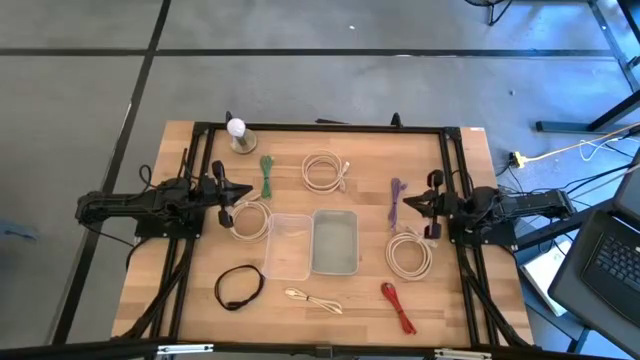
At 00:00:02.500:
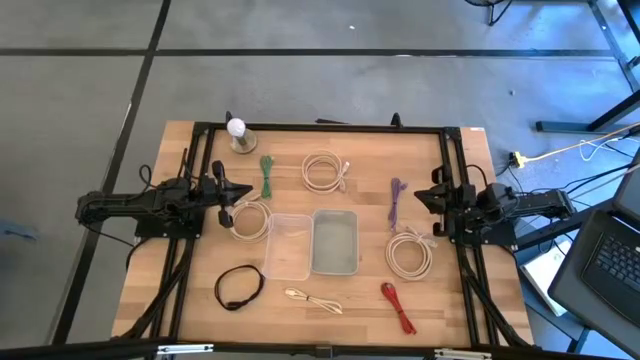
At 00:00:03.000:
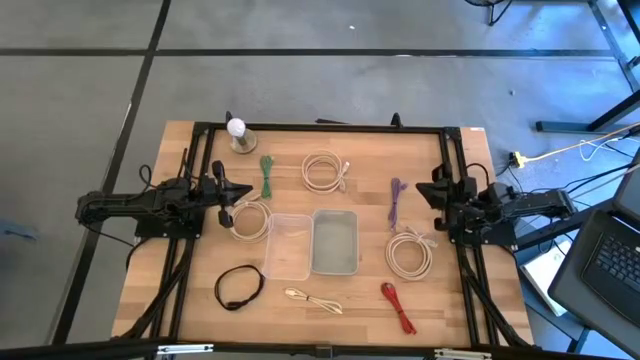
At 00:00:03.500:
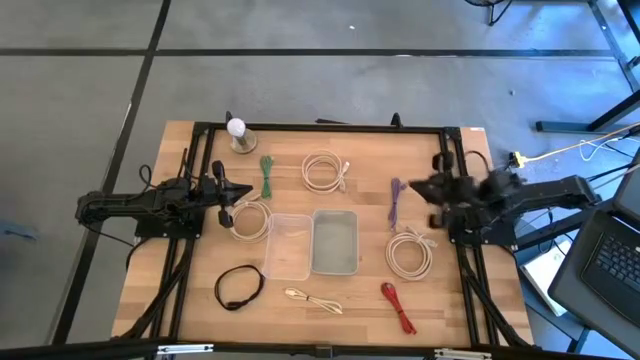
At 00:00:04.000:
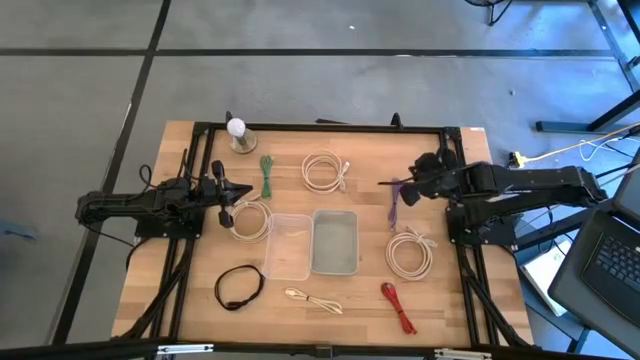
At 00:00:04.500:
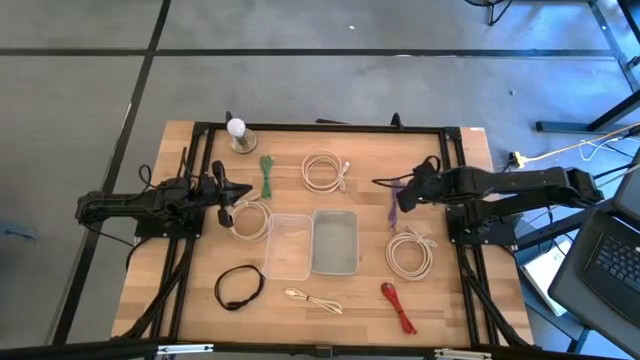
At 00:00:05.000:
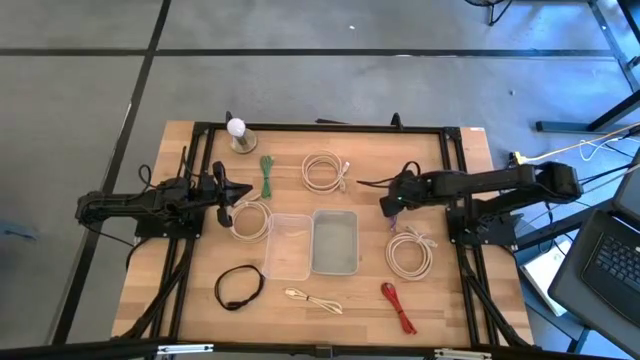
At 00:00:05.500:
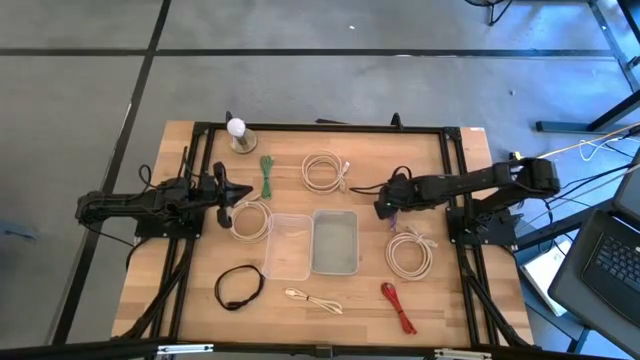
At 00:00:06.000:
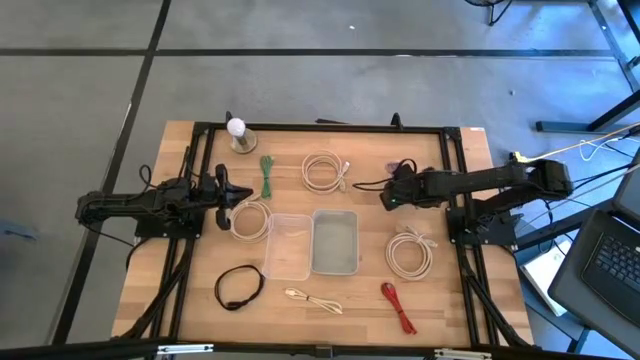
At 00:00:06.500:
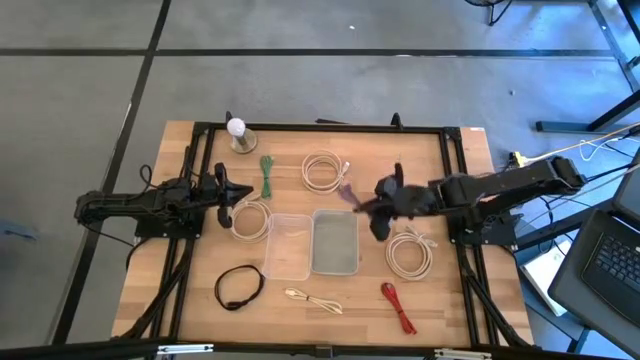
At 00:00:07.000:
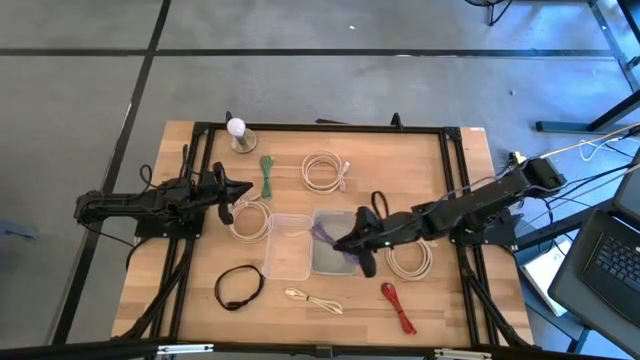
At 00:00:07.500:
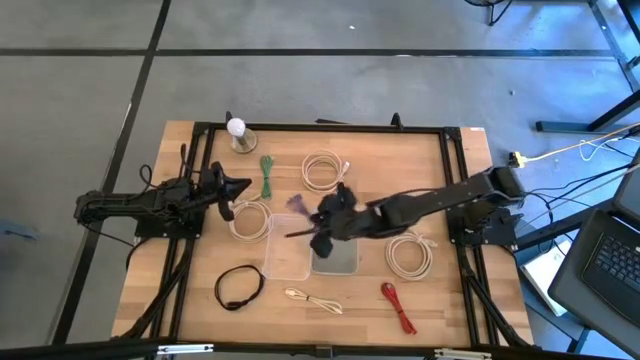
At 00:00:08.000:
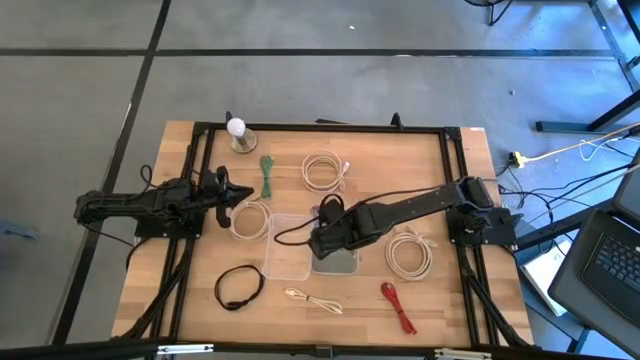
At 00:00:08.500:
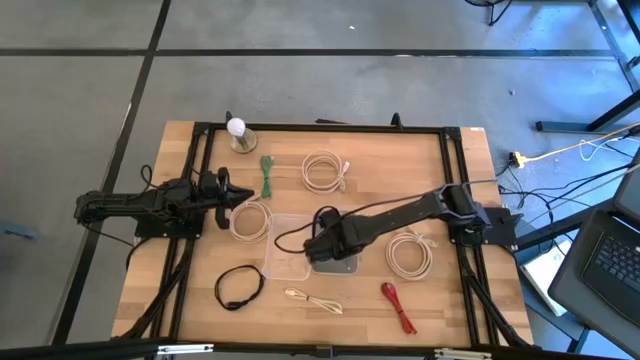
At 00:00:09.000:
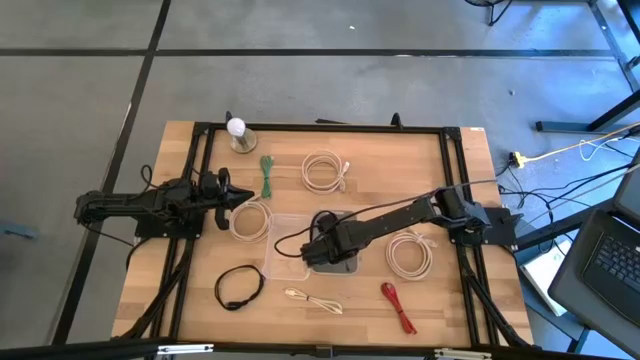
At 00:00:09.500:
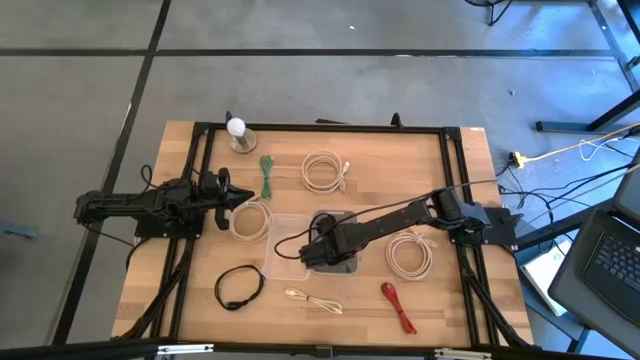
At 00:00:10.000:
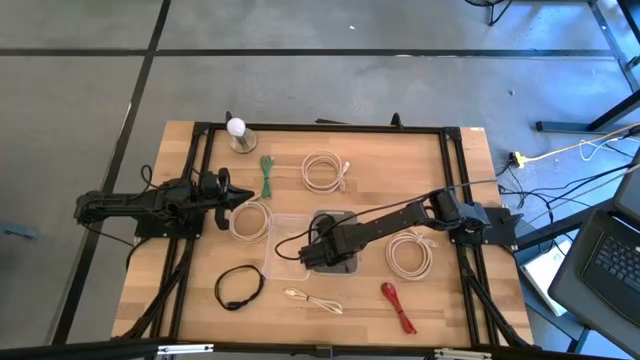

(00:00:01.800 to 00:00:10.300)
Put the violet charger cable into the gray bin

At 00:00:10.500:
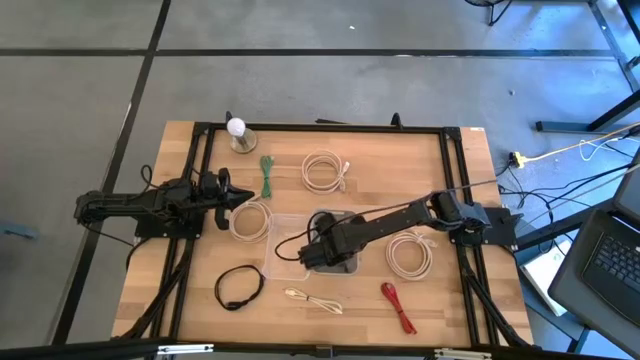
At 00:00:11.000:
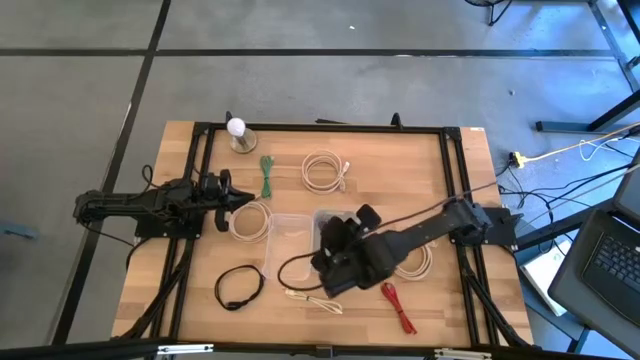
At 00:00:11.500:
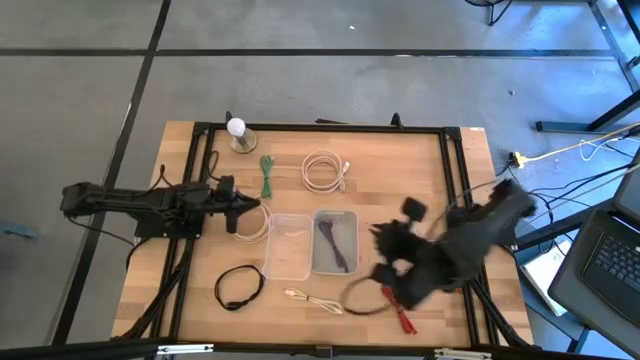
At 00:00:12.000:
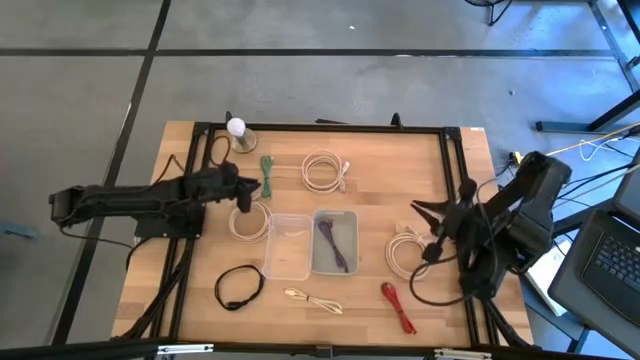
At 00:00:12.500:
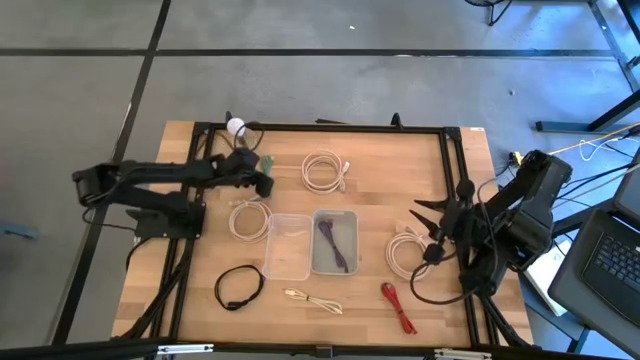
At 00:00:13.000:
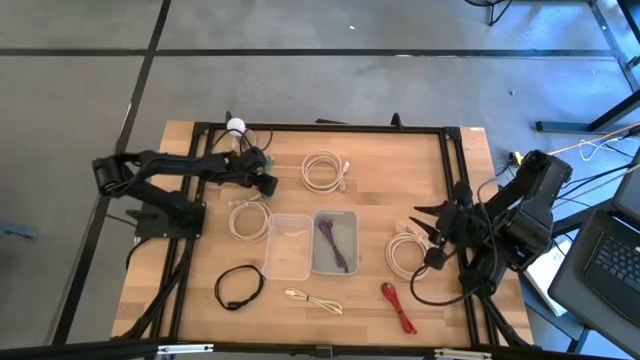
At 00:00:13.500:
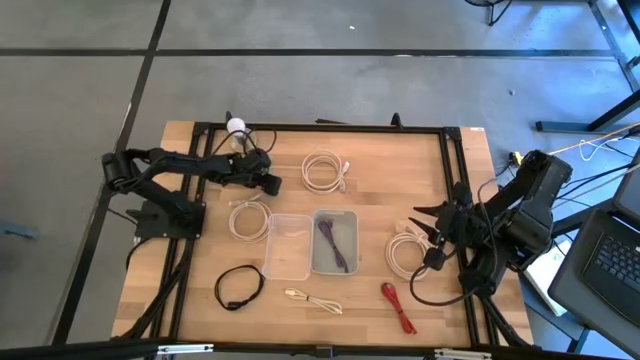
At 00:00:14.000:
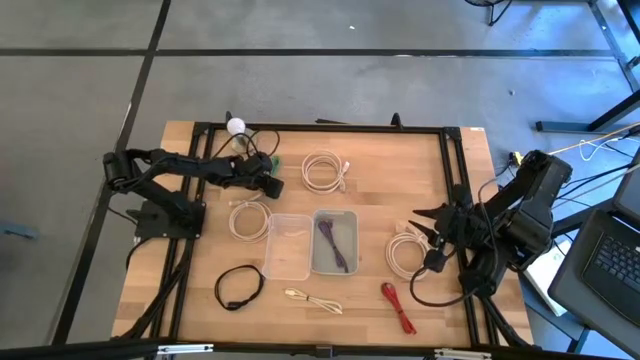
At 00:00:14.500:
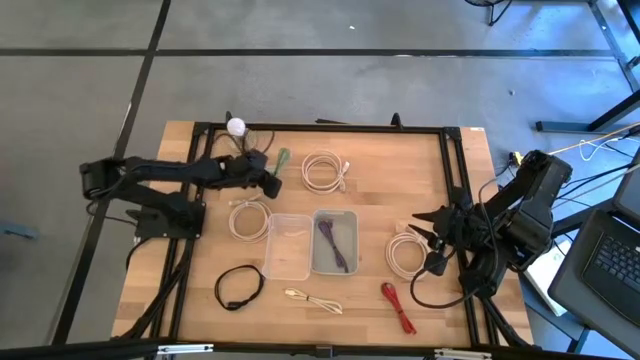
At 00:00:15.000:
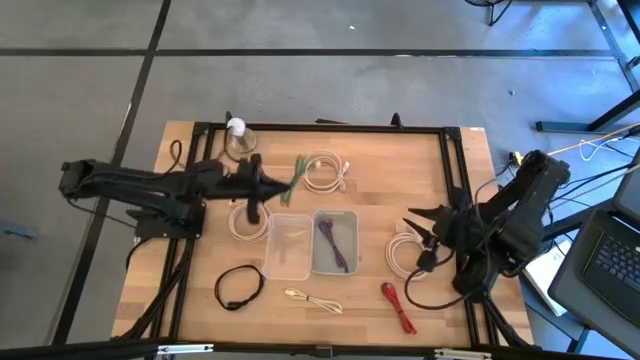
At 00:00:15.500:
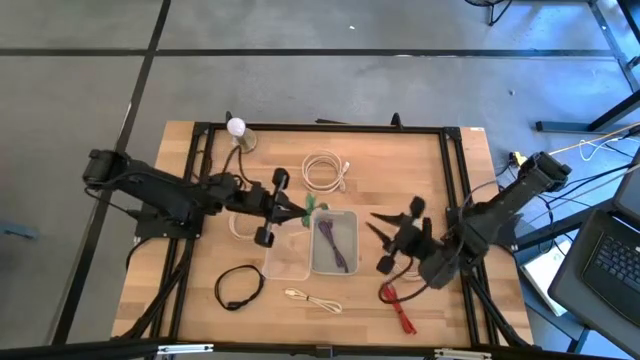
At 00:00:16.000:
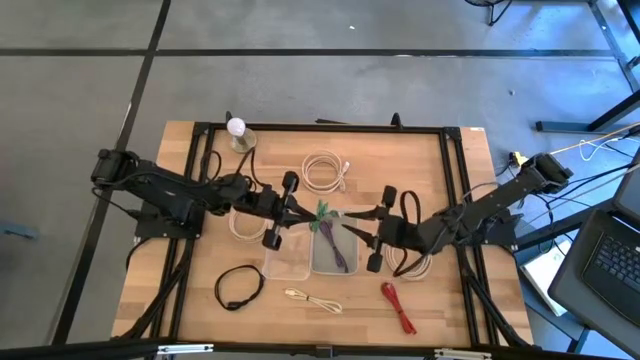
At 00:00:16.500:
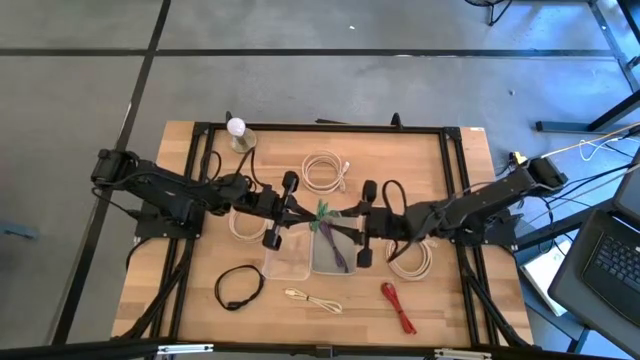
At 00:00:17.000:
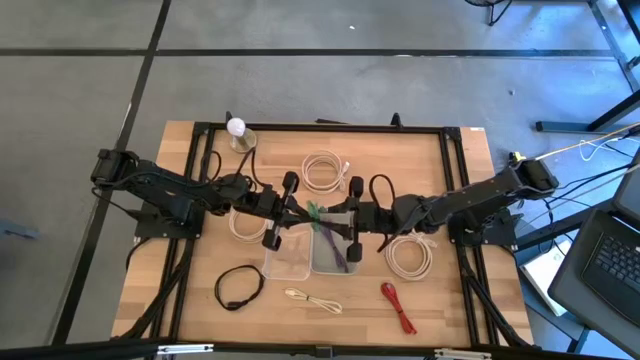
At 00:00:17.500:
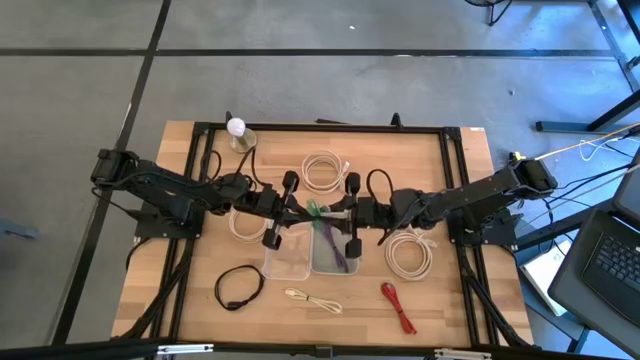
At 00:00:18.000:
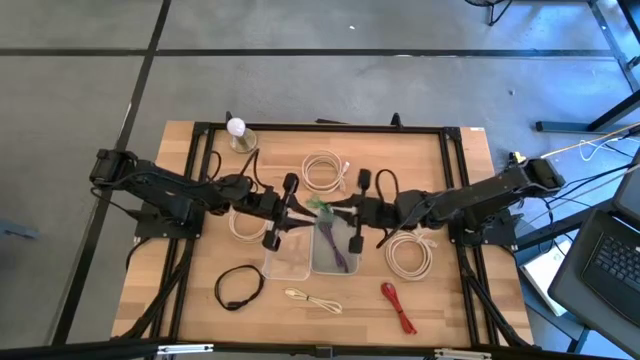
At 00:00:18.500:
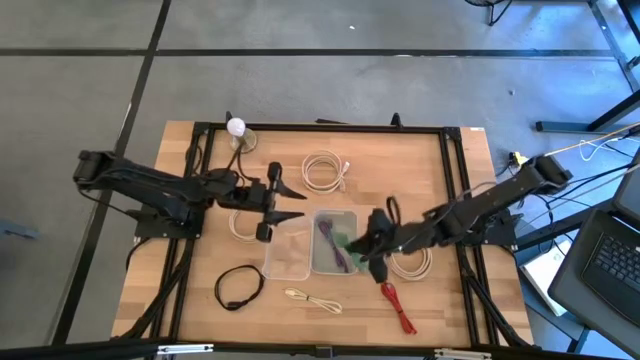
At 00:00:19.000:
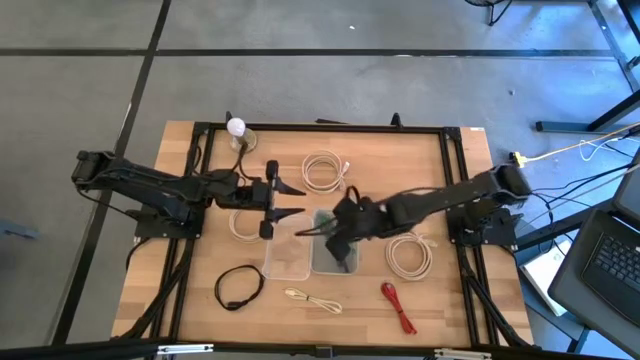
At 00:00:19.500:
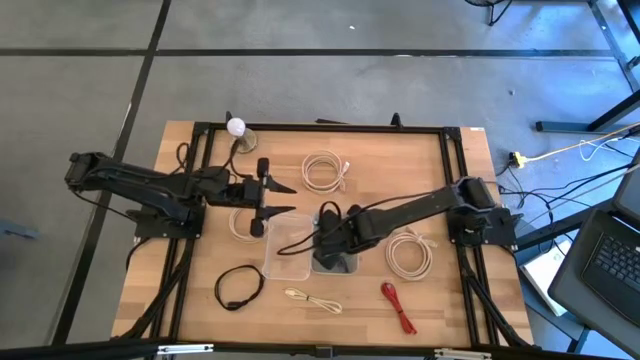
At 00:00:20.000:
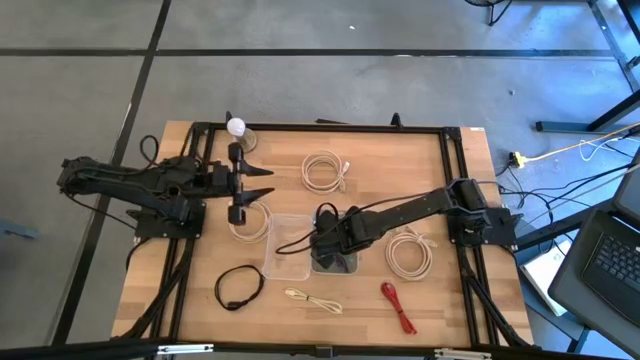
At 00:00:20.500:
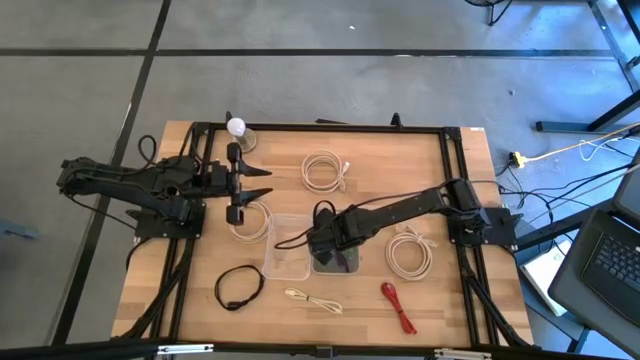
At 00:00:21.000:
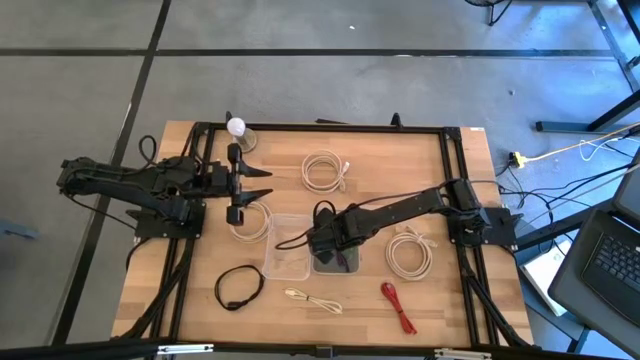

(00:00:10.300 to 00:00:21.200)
Put the green charger cable into the gray bin
